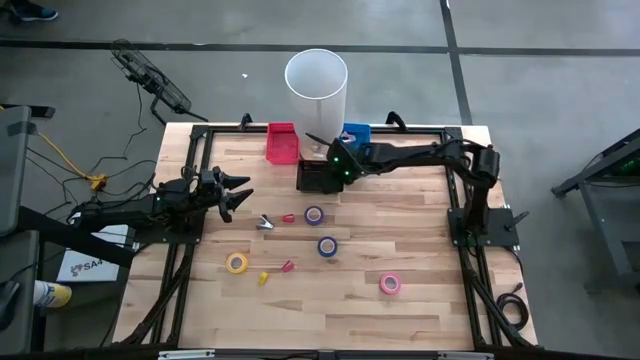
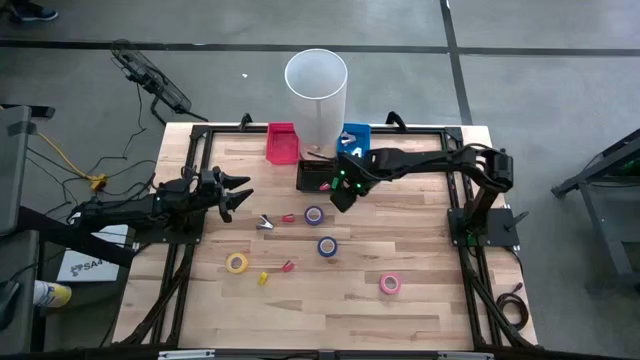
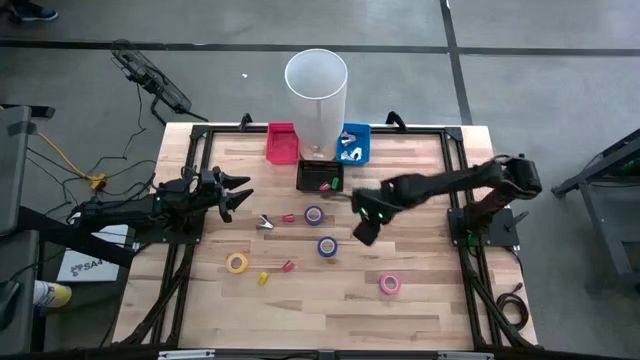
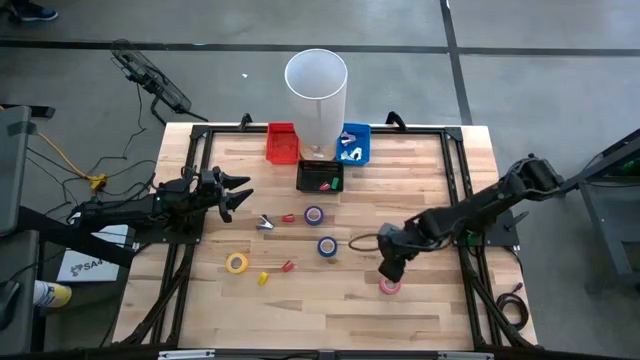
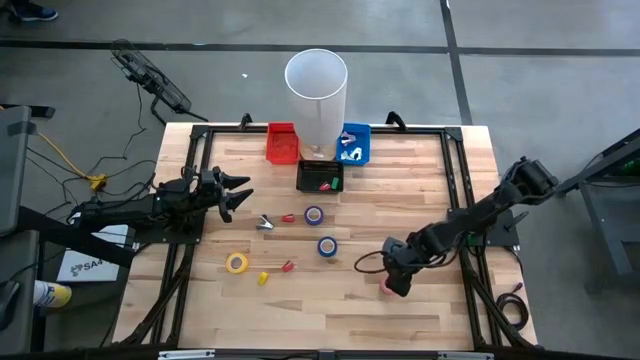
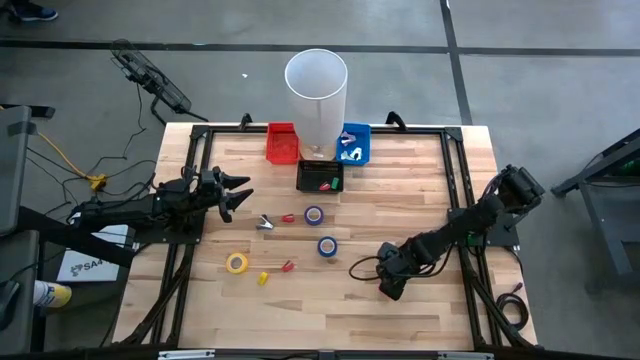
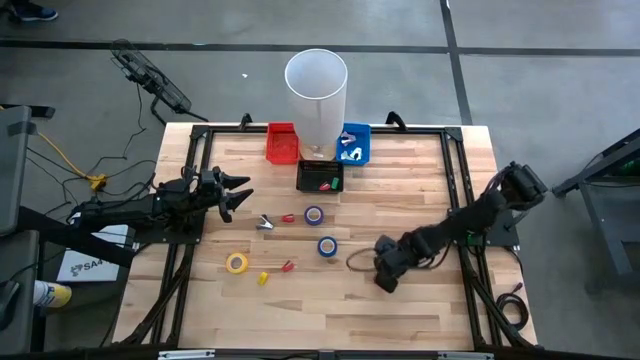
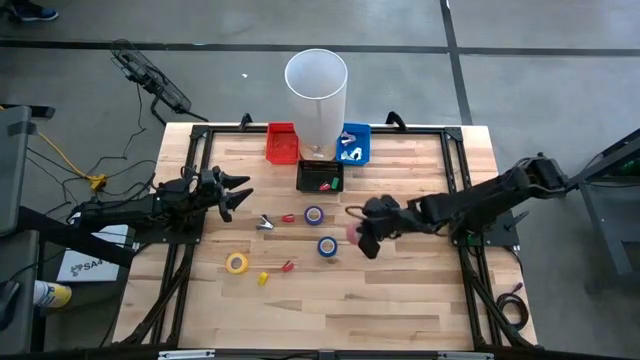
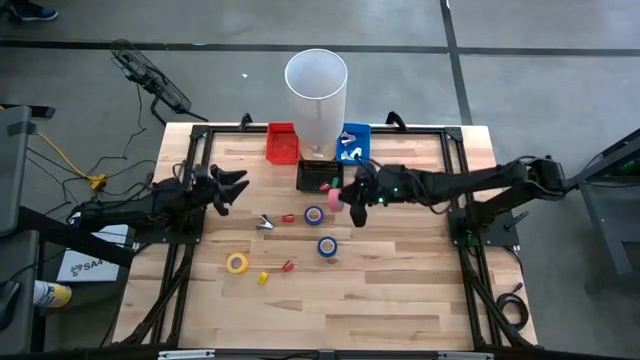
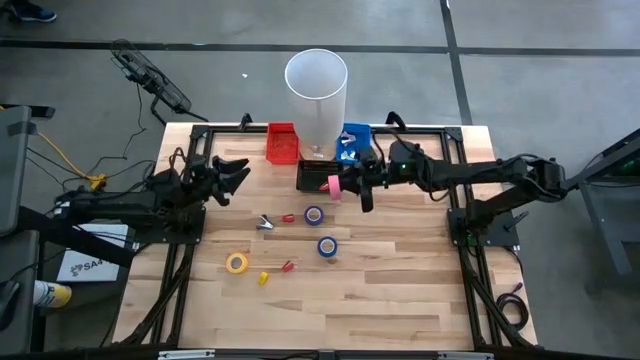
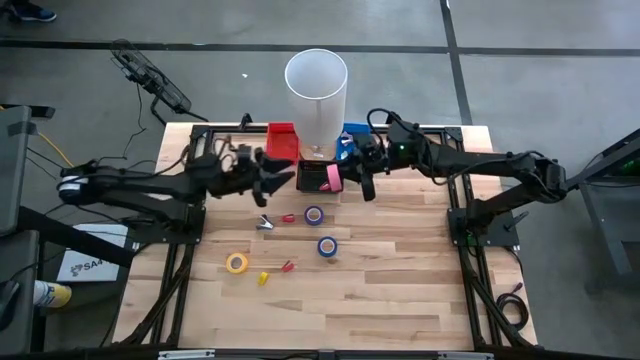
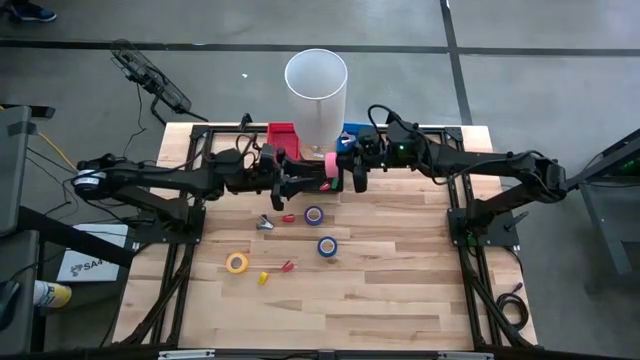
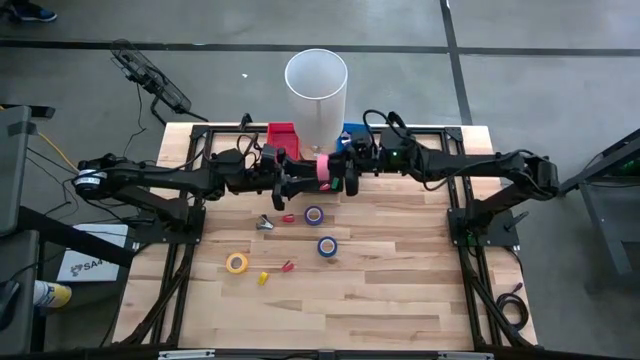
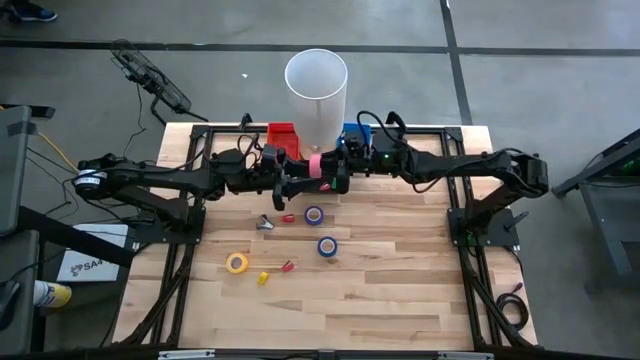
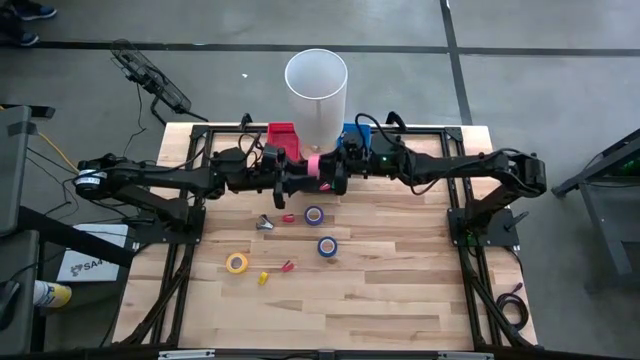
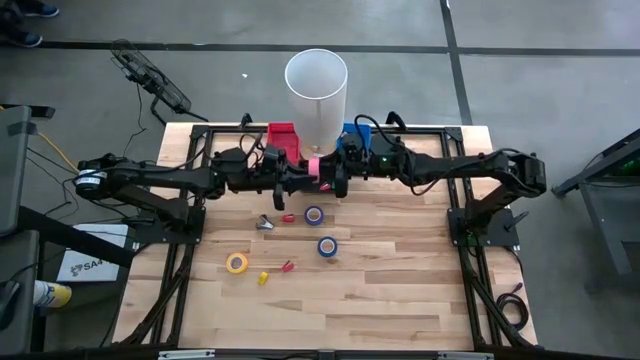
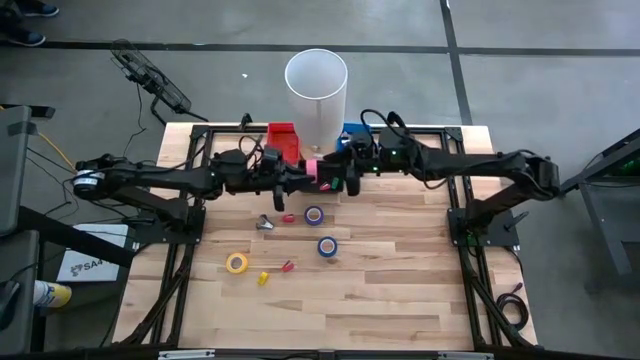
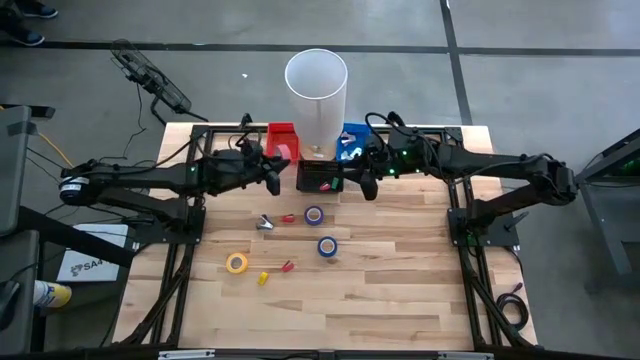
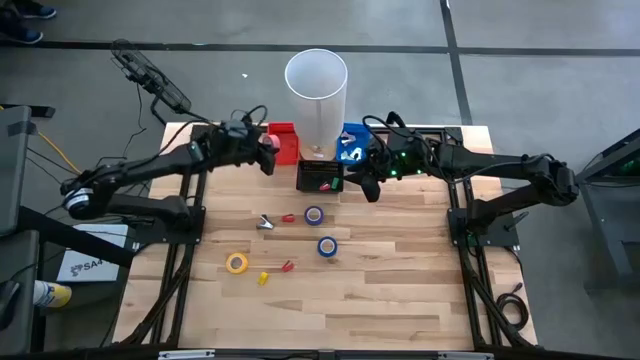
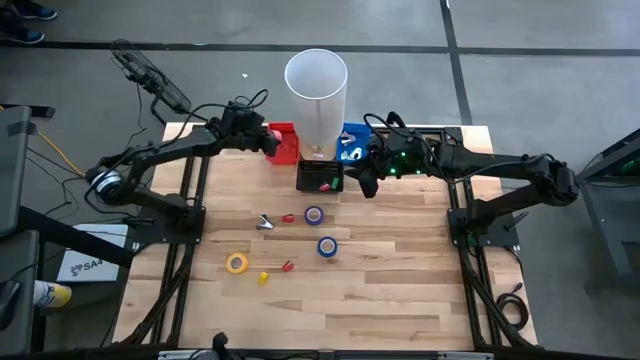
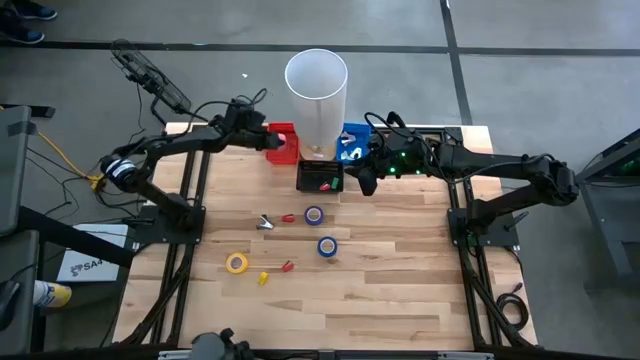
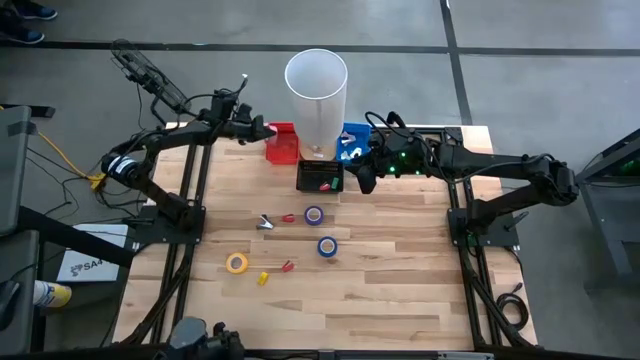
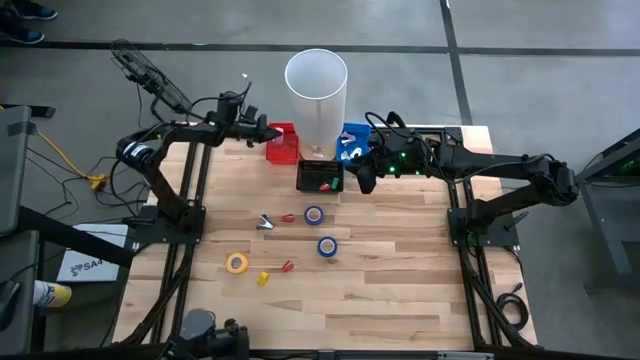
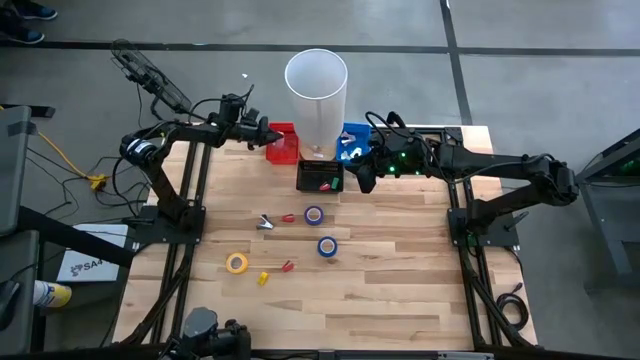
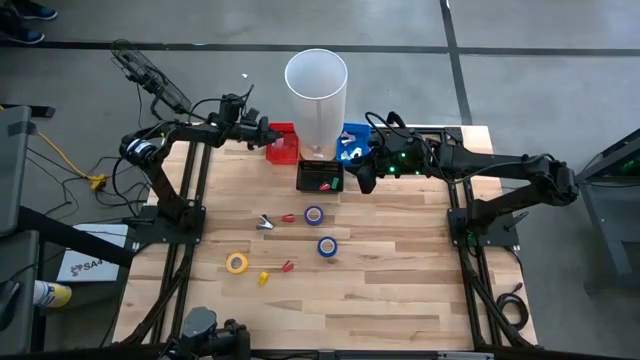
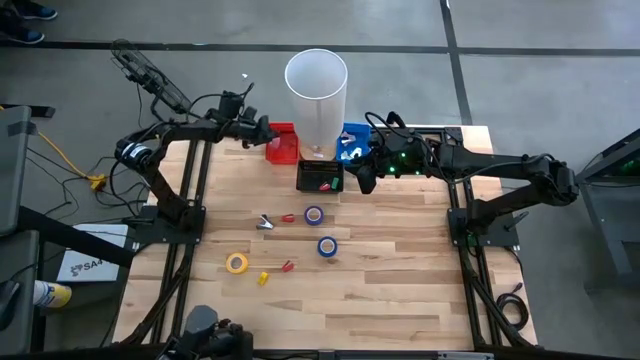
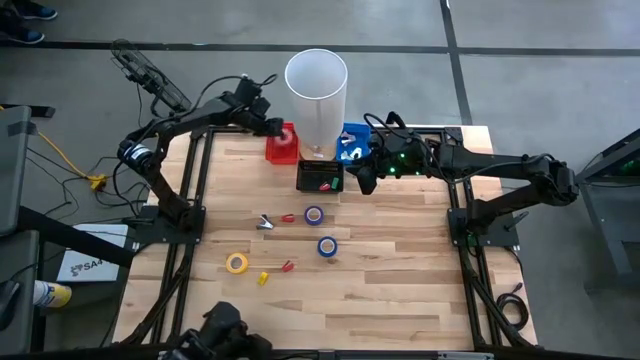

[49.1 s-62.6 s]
Task: Pick and place Stapler, Stapler remover, tape
Put the pink tape into the red bin

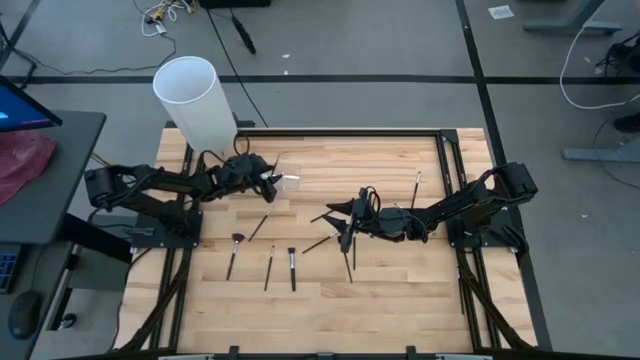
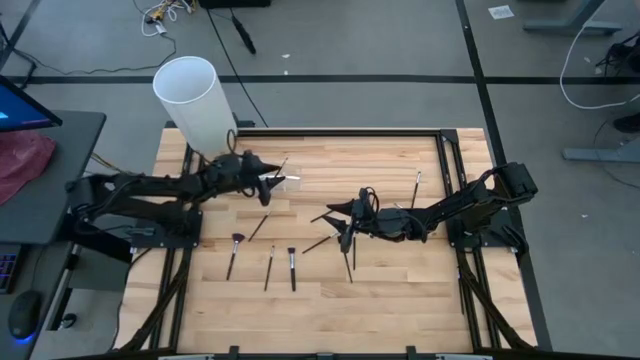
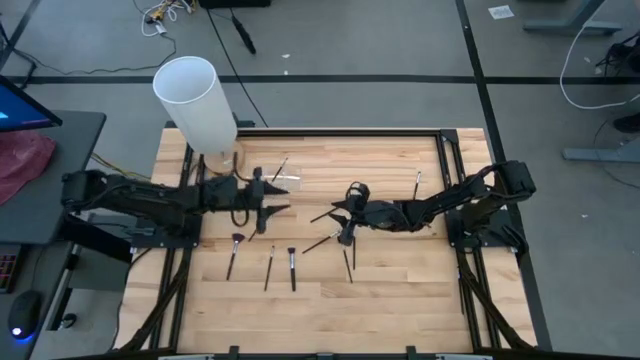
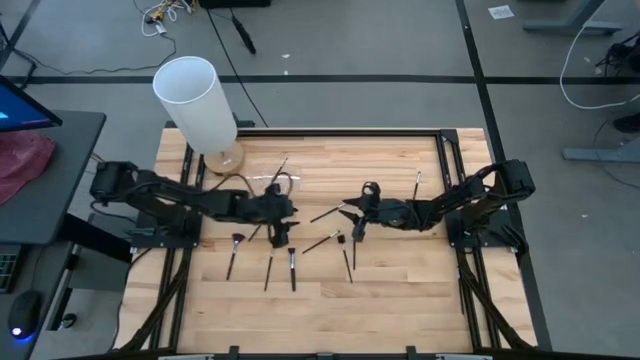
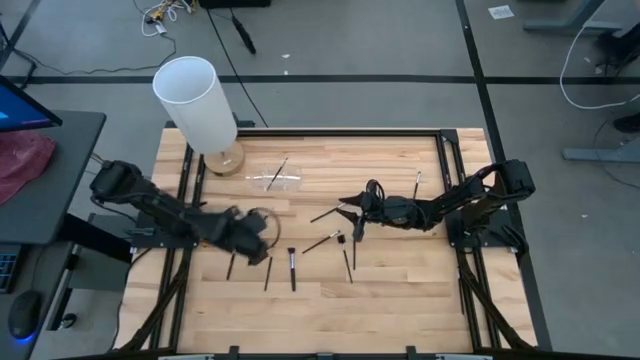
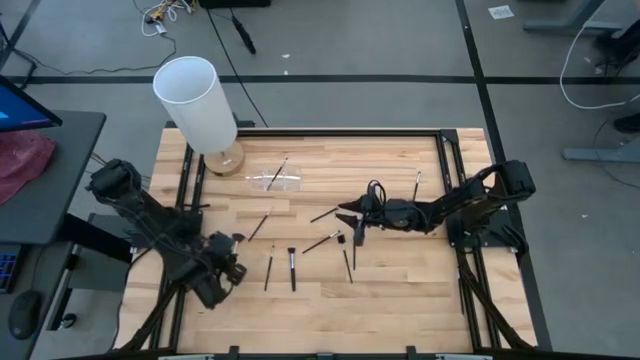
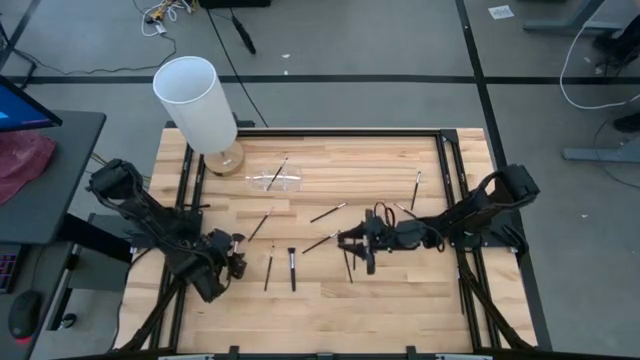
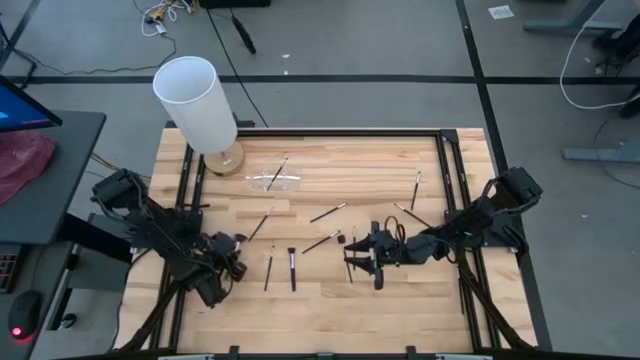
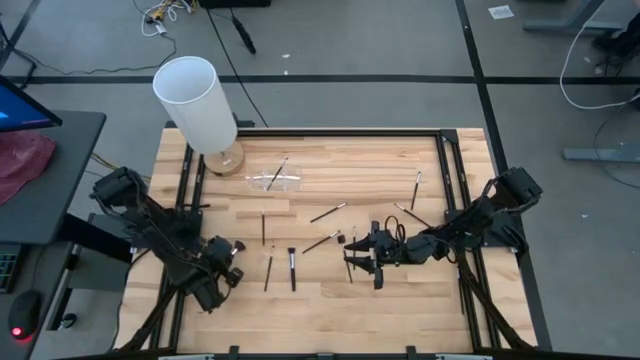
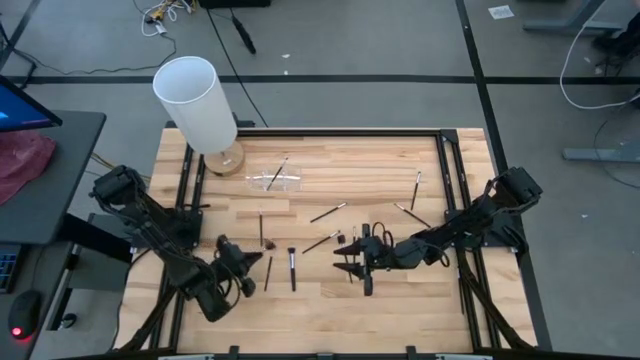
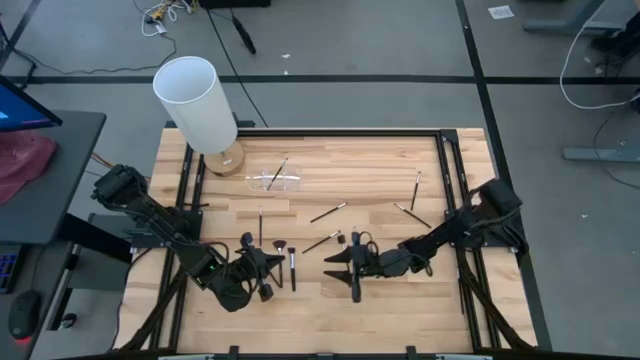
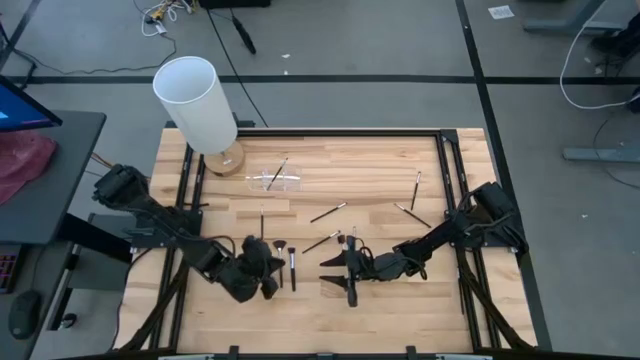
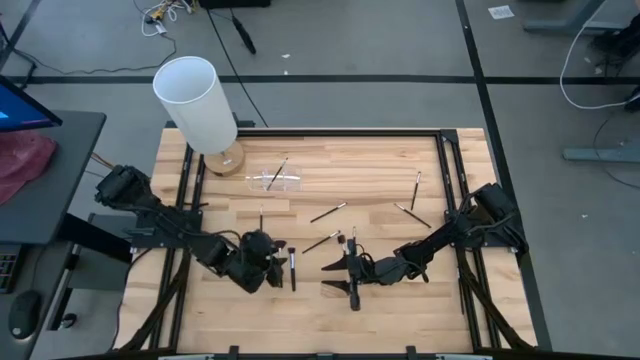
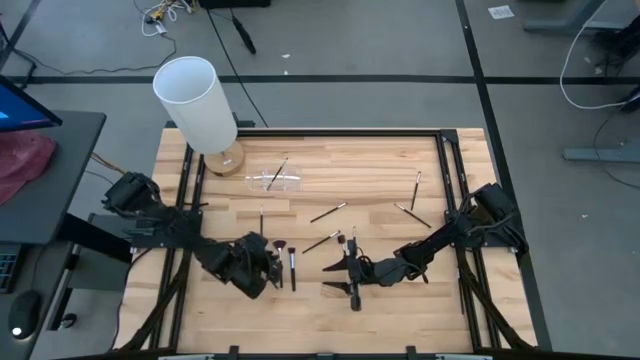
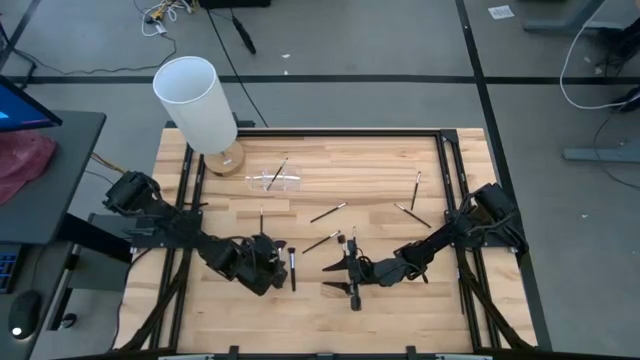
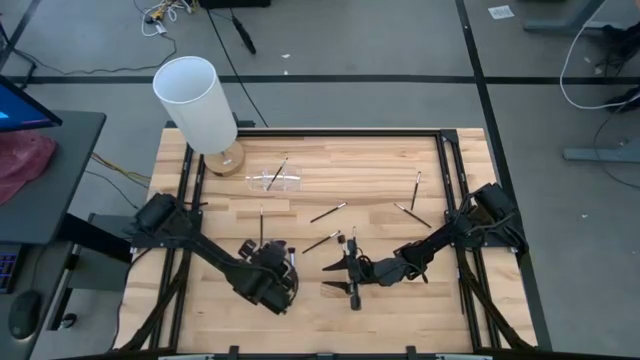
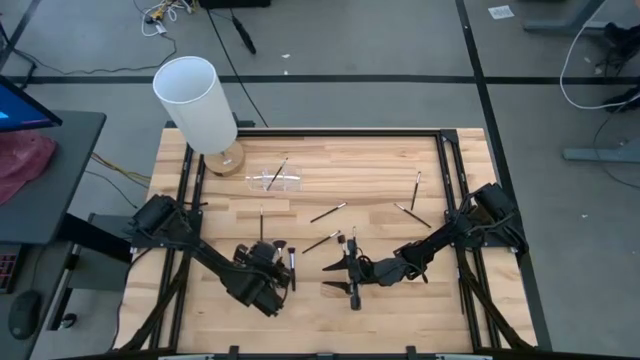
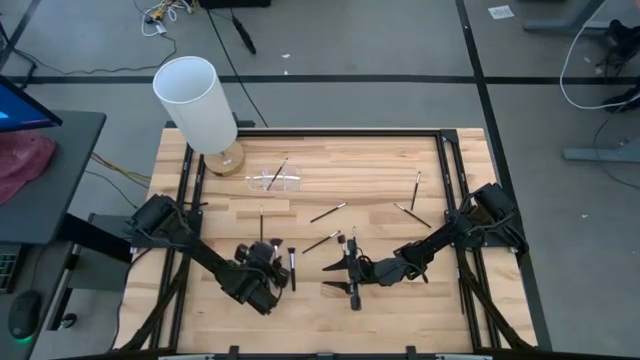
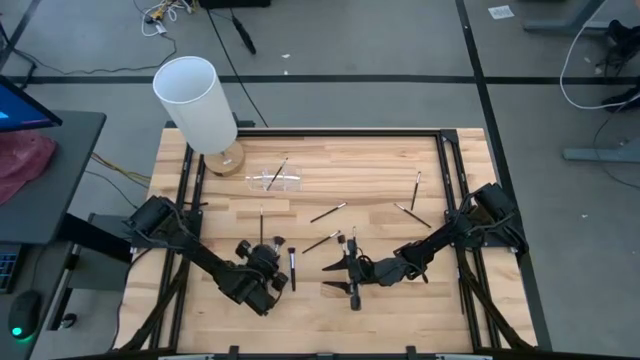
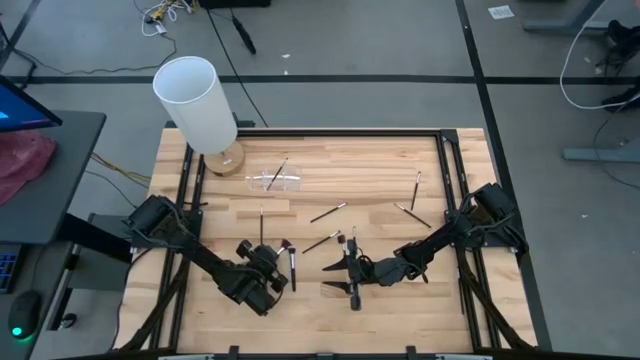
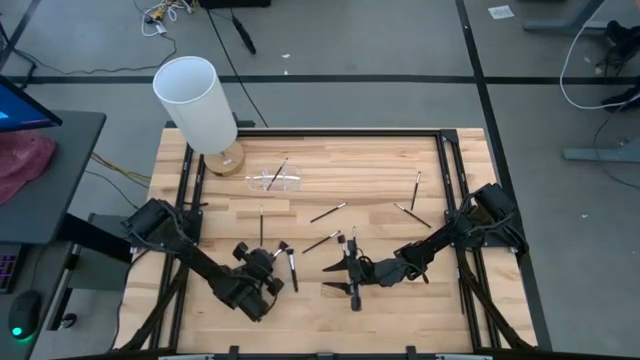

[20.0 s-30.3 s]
Task: Put items in baskets/containers
Put the highlighter brush into the transparent organizer
